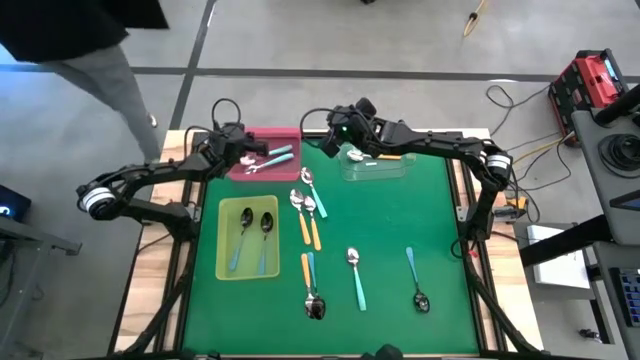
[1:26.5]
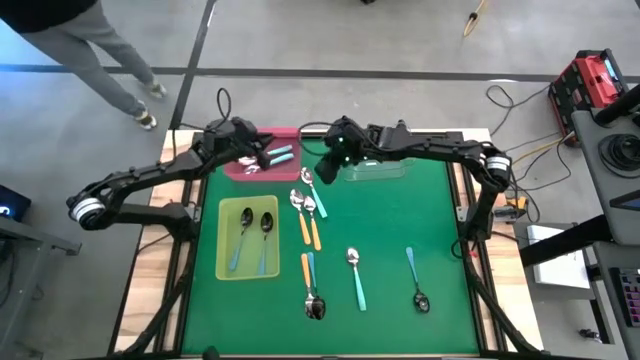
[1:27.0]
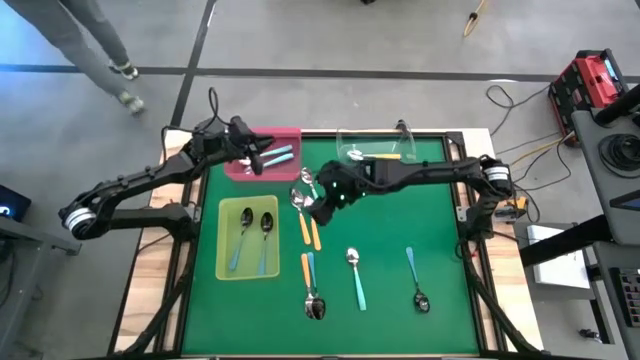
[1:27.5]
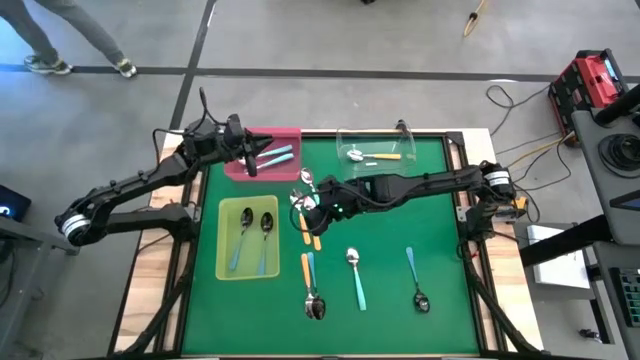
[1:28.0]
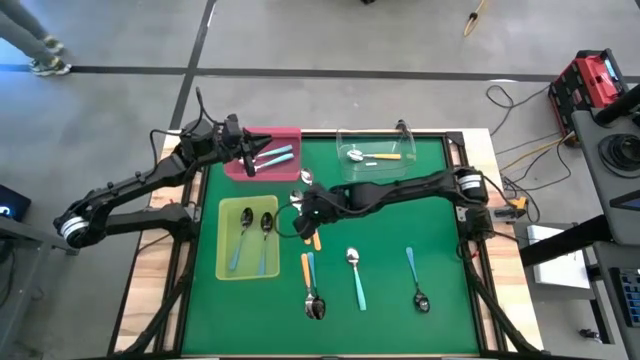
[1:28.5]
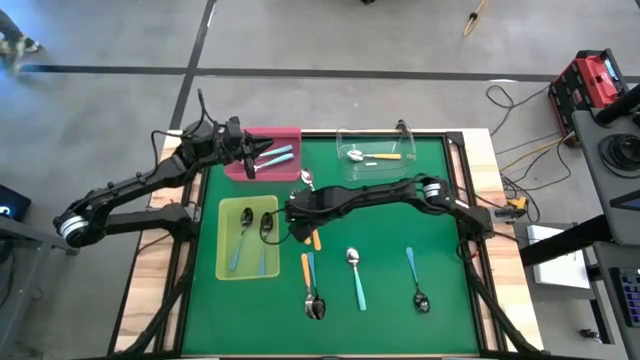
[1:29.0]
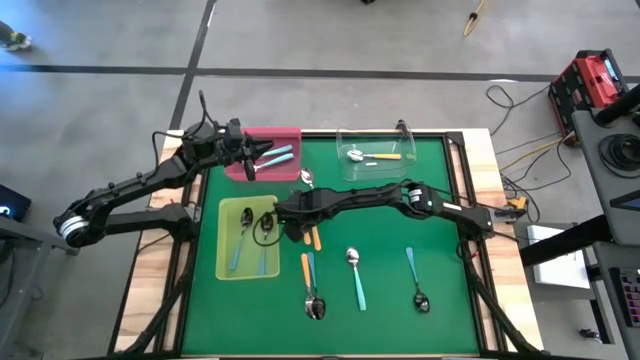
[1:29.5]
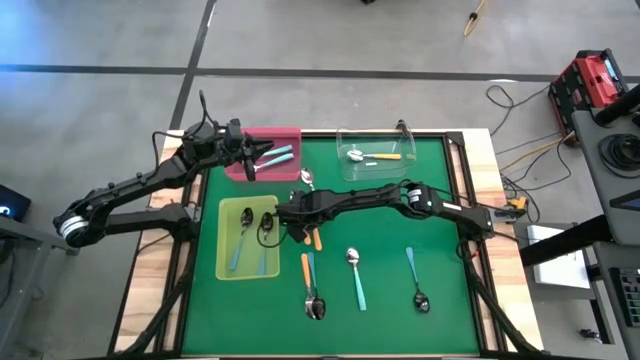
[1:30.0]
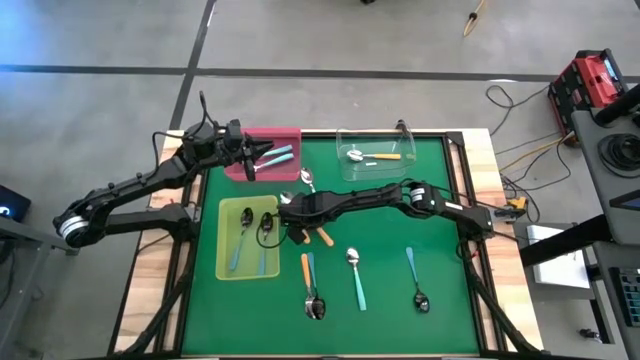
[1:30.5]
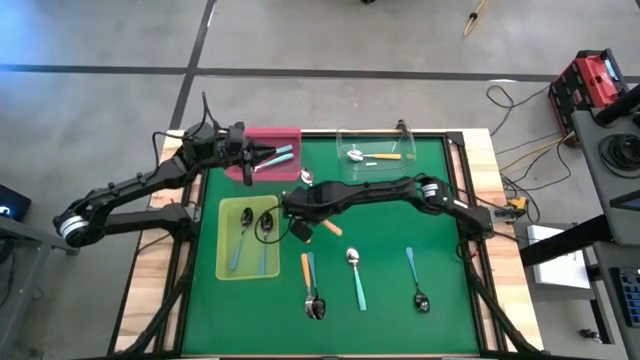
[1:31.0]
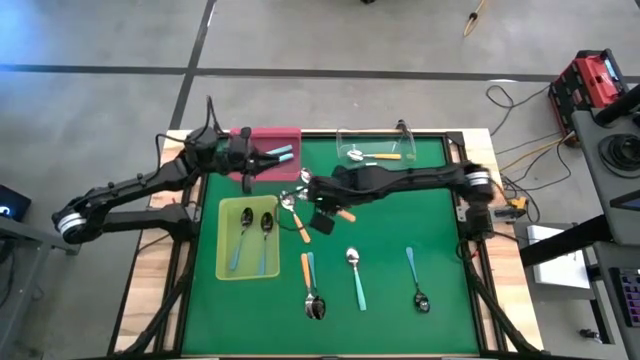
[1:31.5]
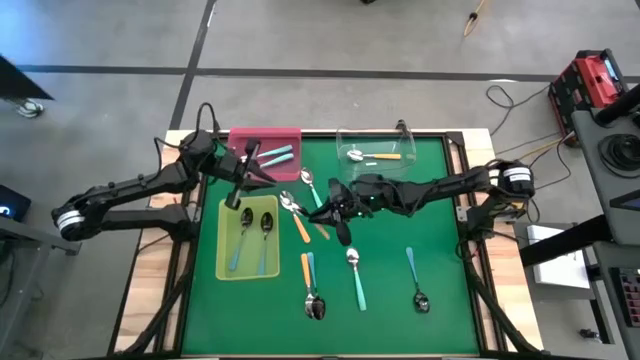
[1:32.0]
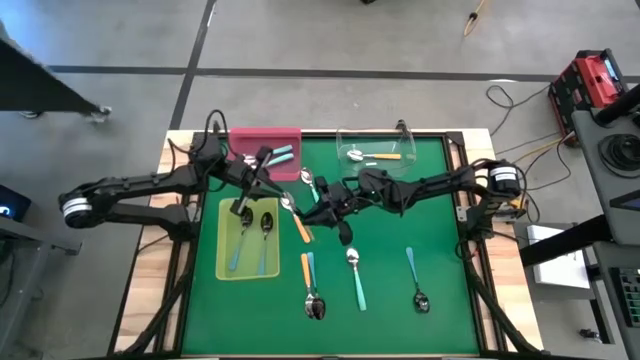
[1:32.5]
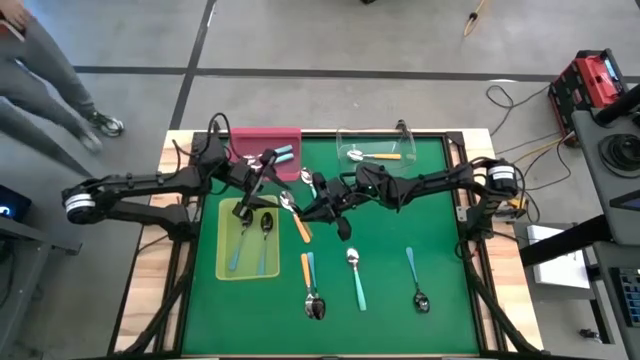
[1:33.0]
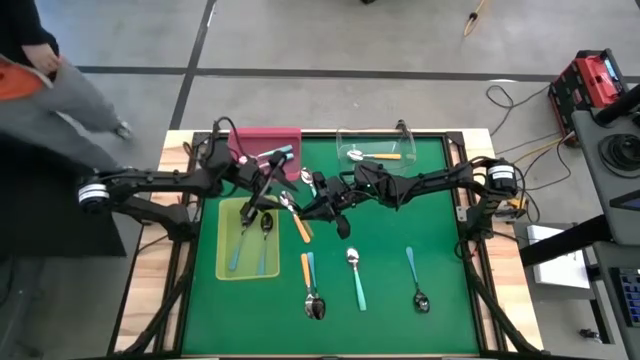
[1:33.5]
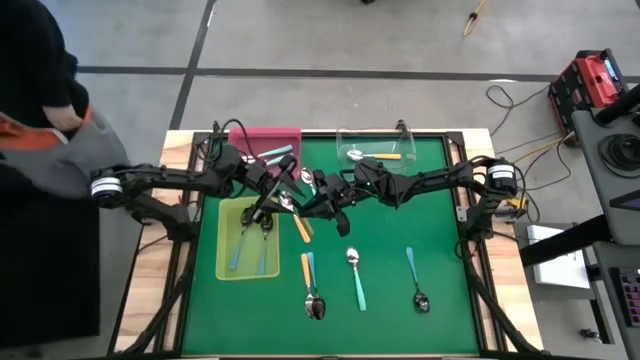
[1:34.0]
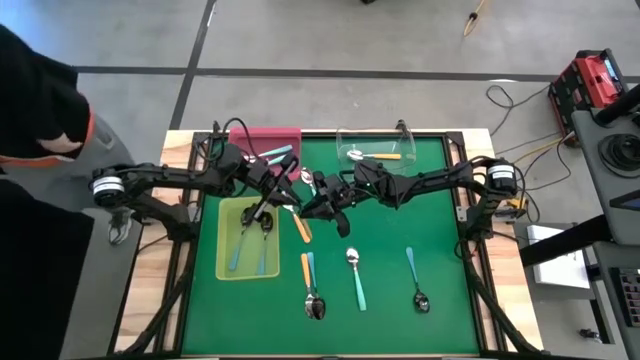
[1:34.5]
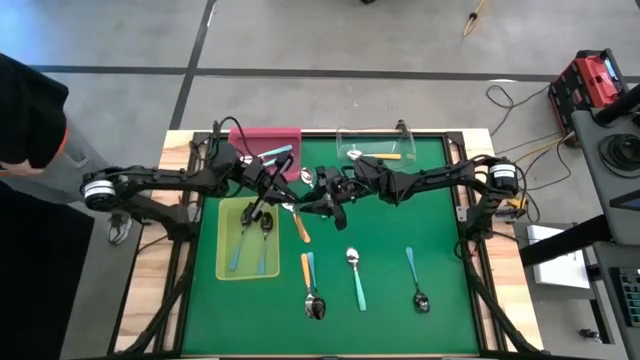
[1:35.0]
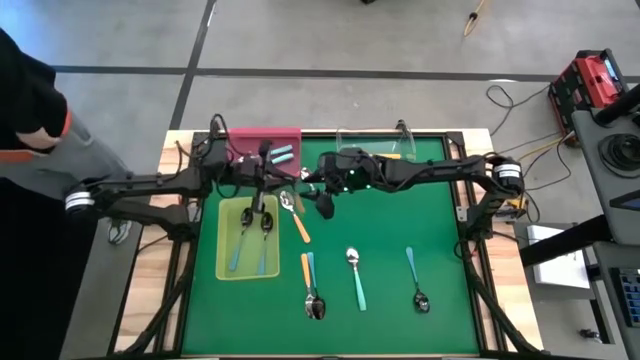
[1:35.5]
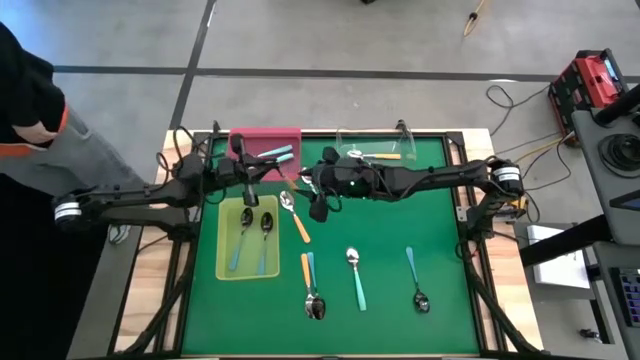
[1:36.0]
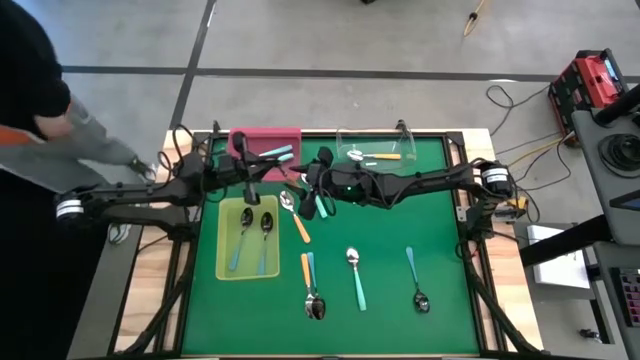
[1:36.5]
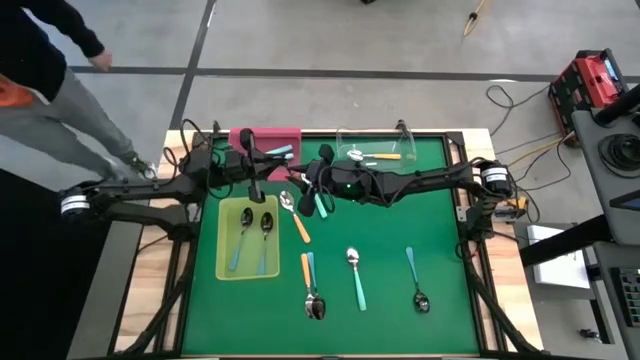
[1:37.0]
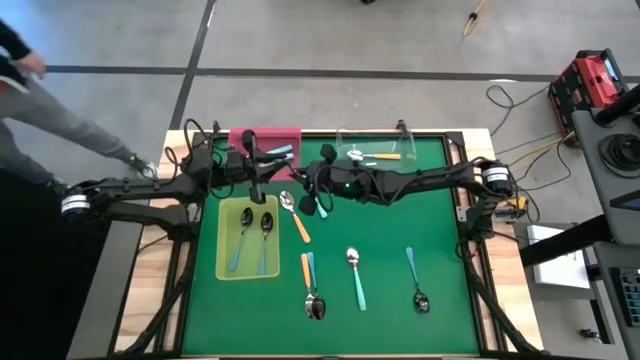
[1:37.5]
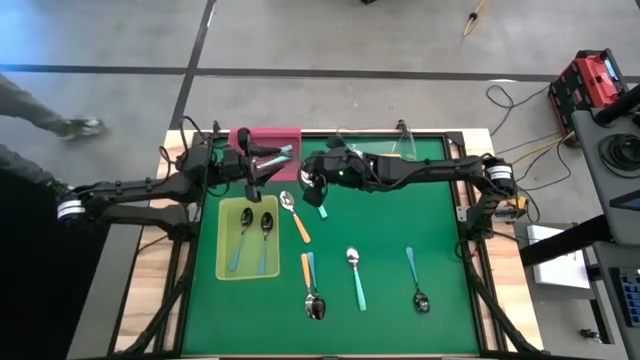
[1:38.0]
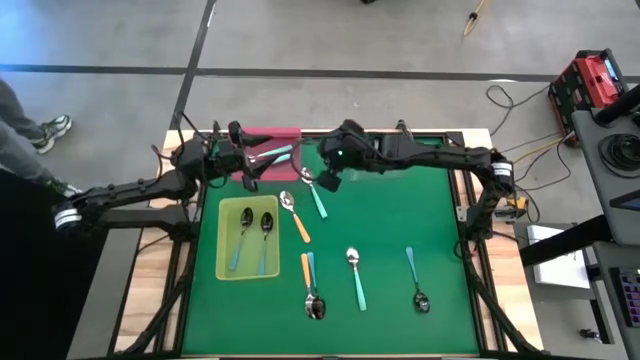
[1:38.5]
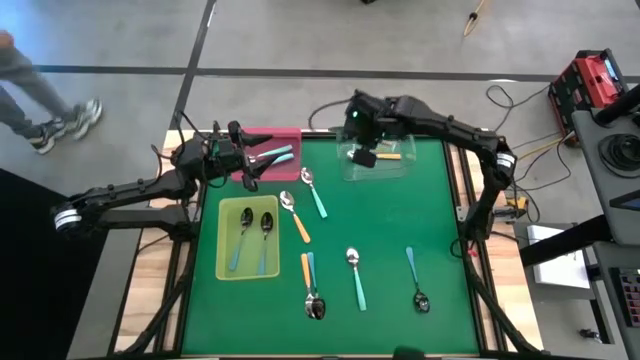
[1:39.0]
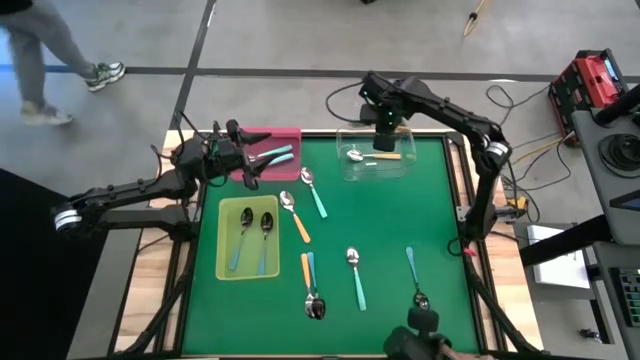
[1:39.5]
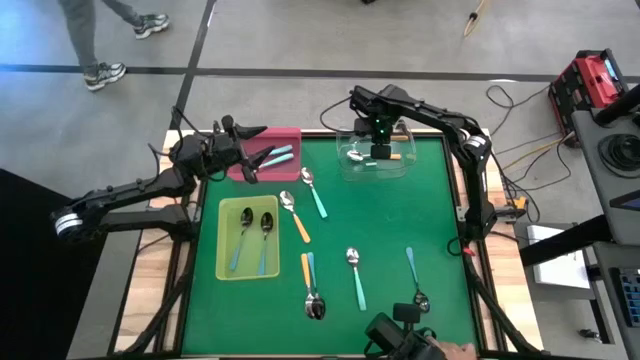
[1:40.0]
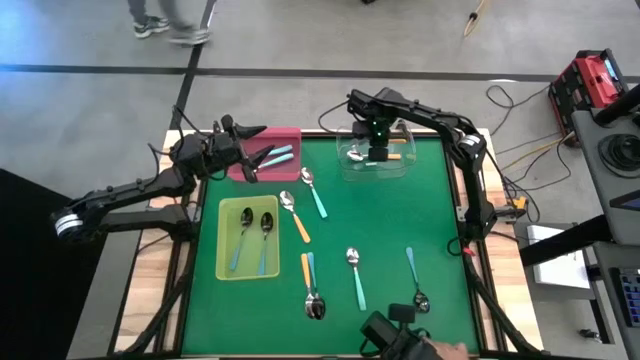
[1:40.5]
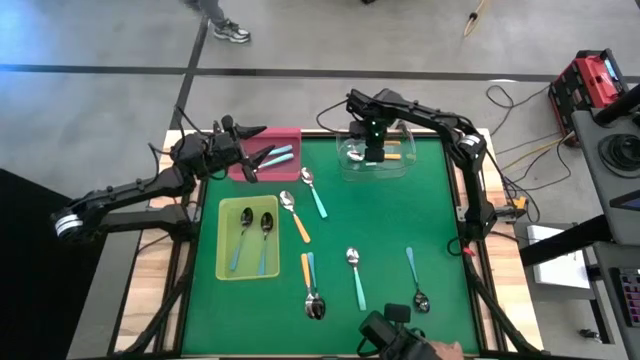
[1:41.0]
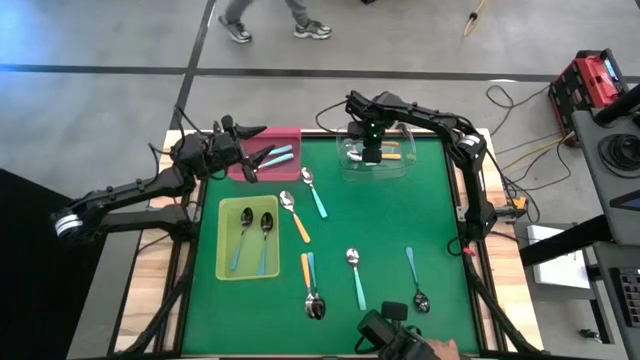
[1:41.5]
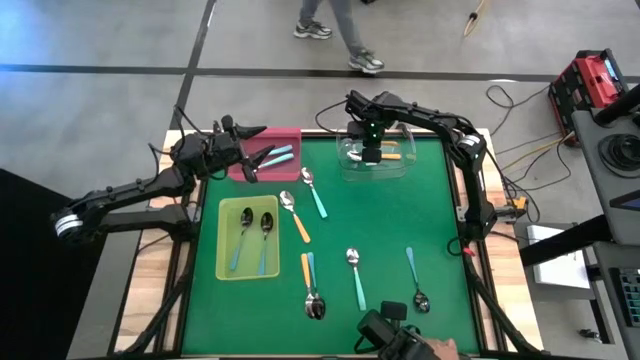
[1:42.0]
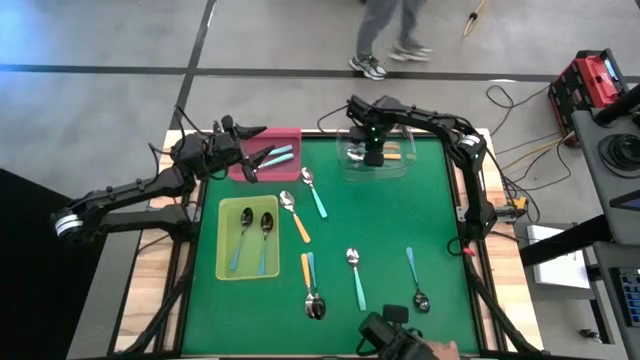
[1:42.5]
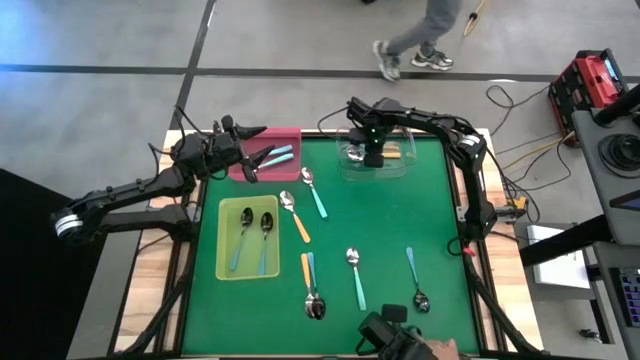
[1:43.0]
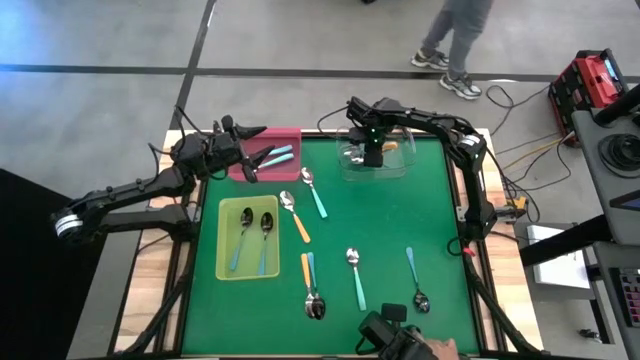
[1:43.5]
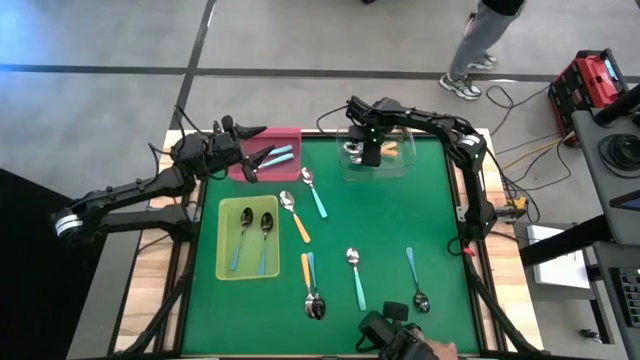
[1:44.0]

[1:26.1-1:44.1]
Task: Sort silverware by color (type)
Put the yellow spoon into the transparent bin

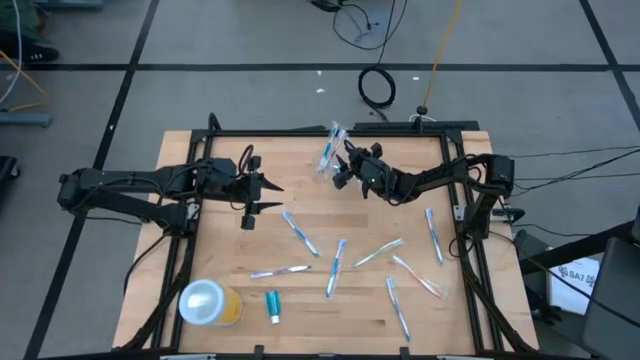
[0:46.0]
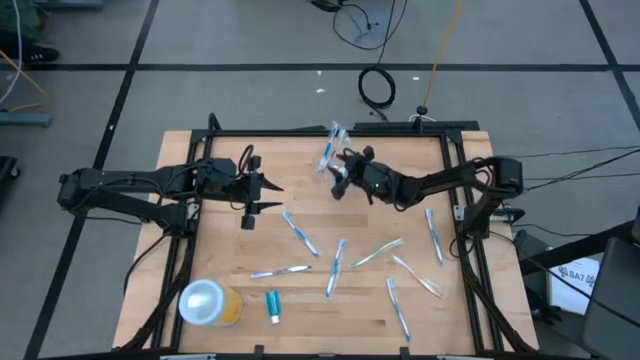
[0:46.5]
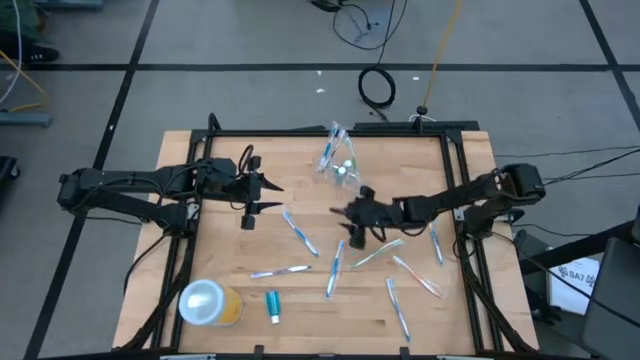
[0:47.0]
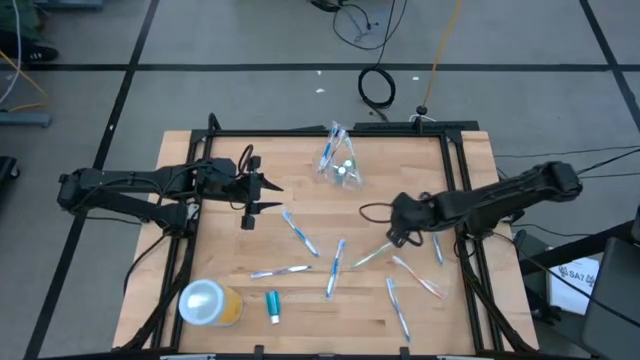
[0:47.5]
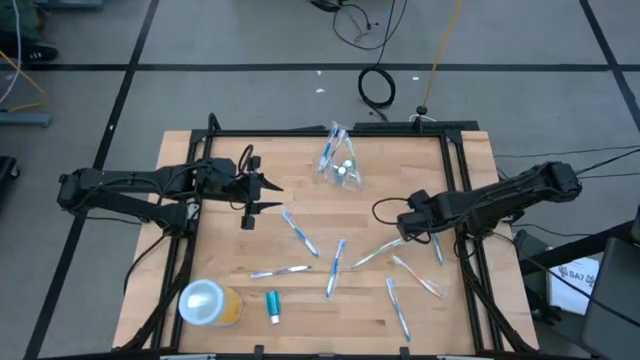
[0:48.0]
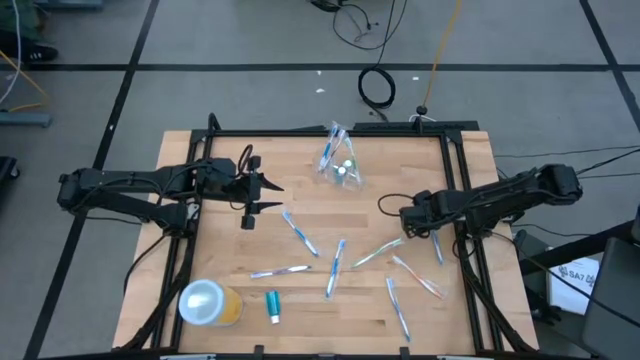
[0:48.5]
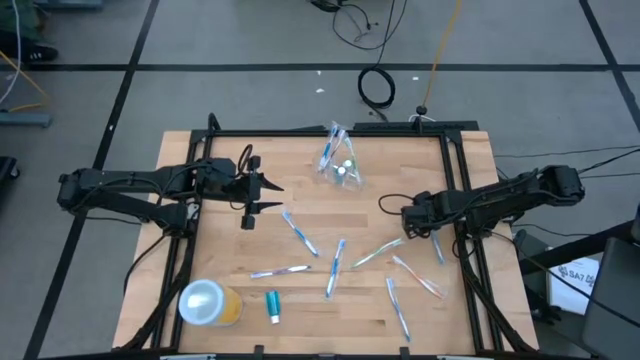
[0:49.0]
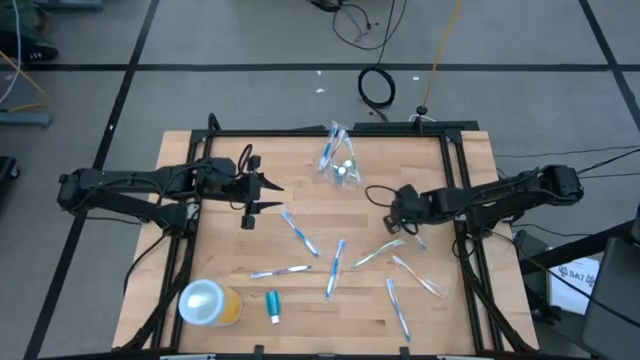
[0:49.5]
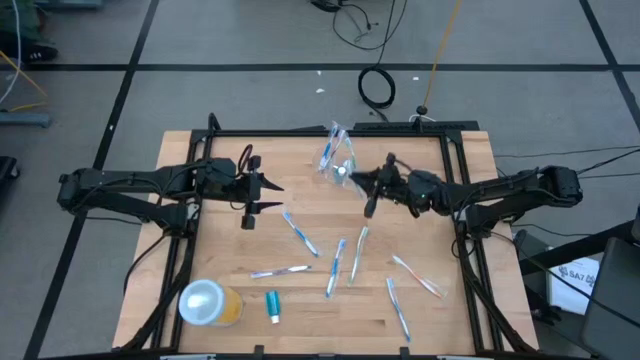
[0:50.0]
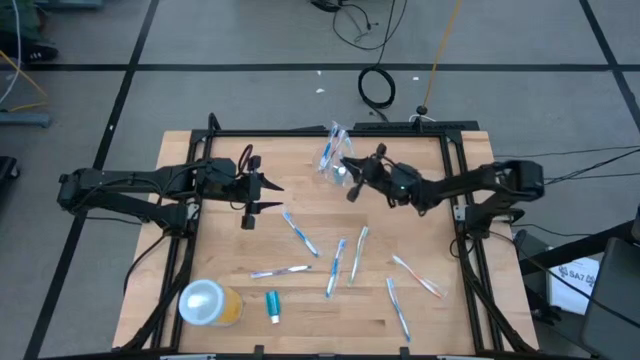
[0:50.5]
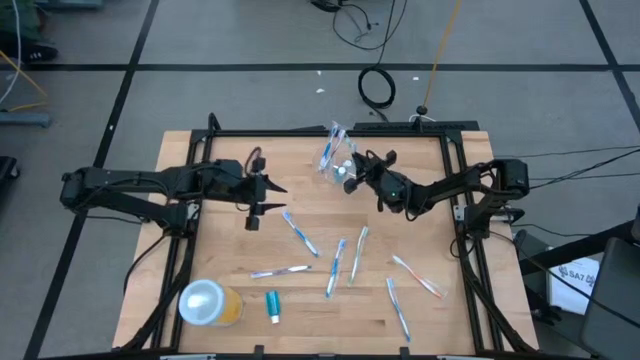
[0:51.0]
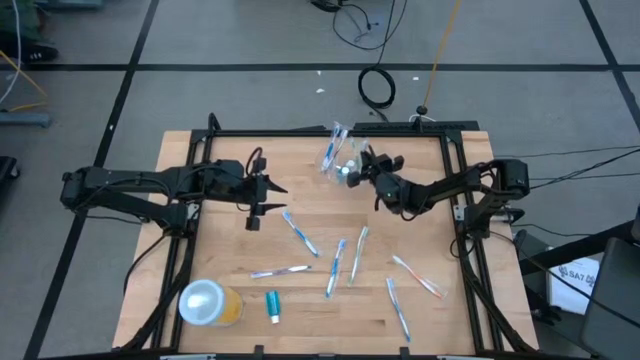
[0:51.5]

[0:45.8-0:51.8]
Task: Pick & Place toothbrushing station
Put the blue toothbrush into the transparent organizer
